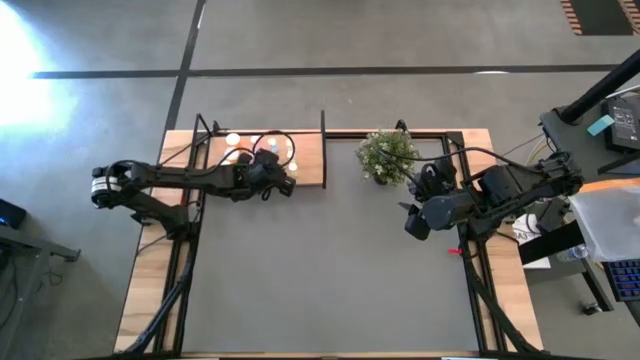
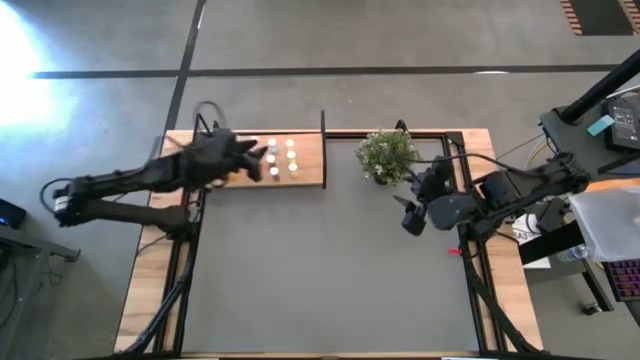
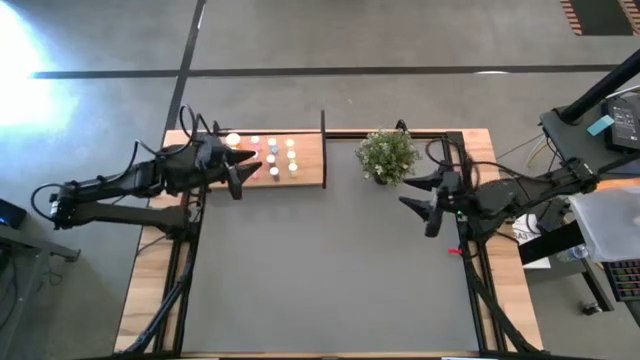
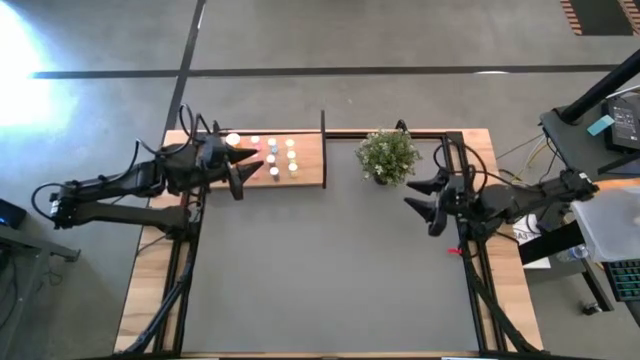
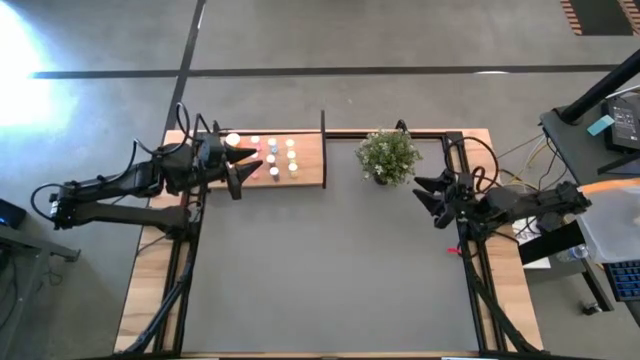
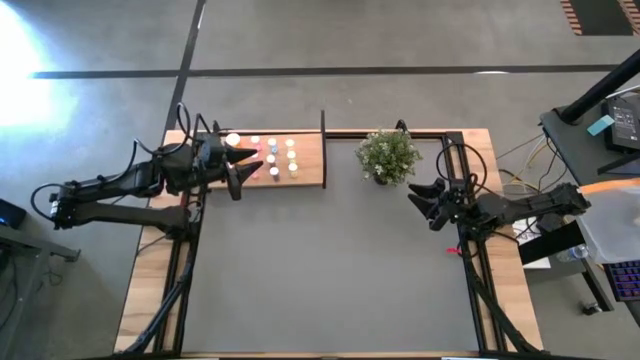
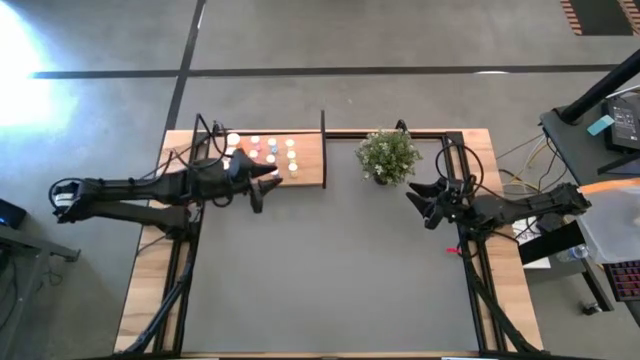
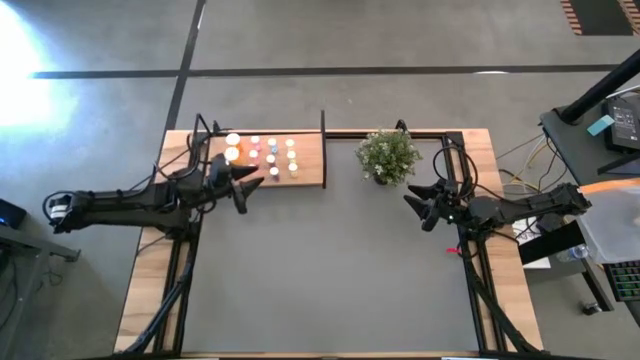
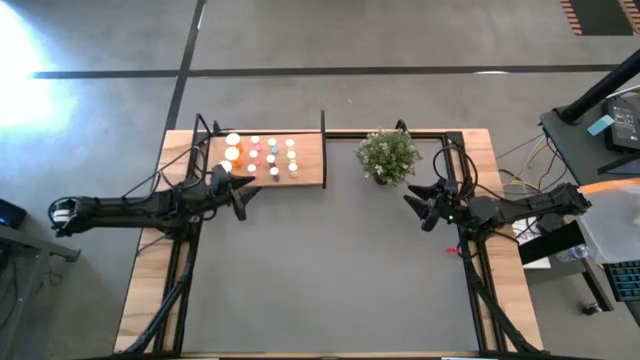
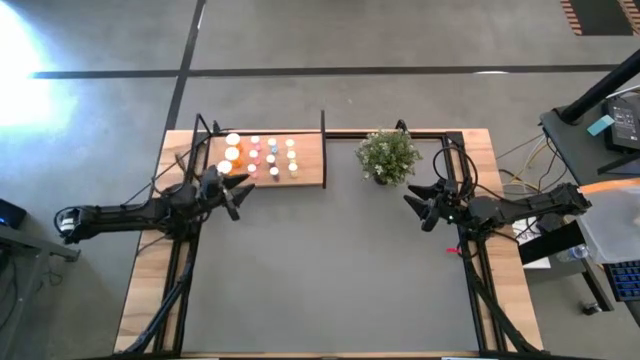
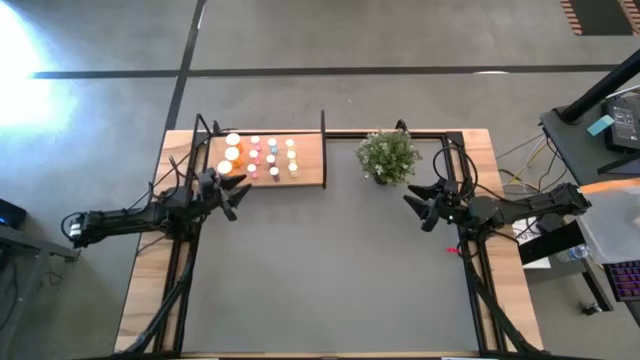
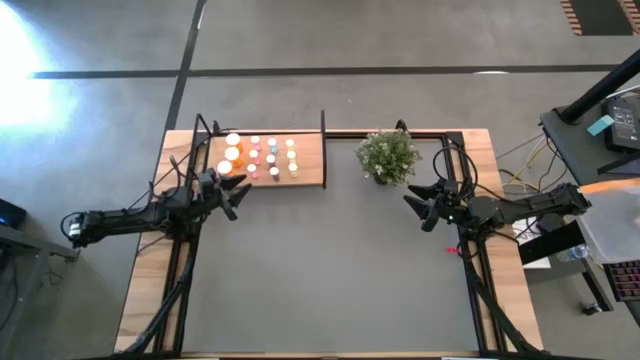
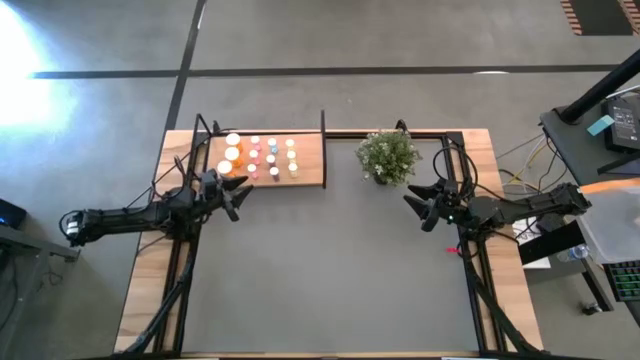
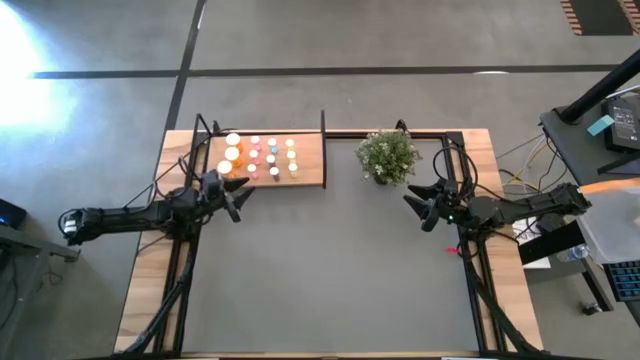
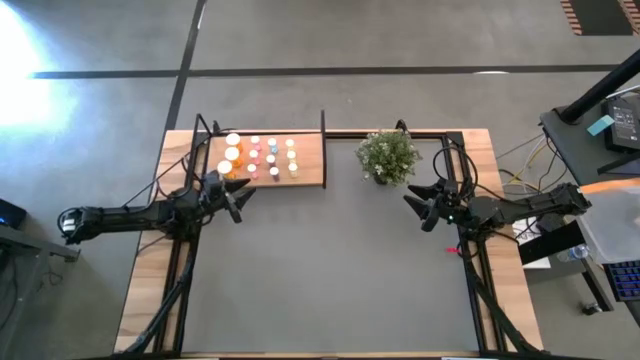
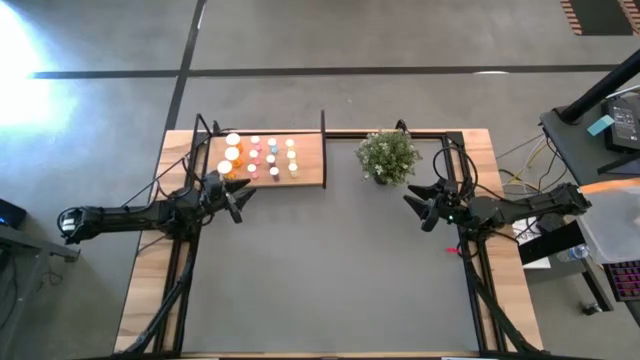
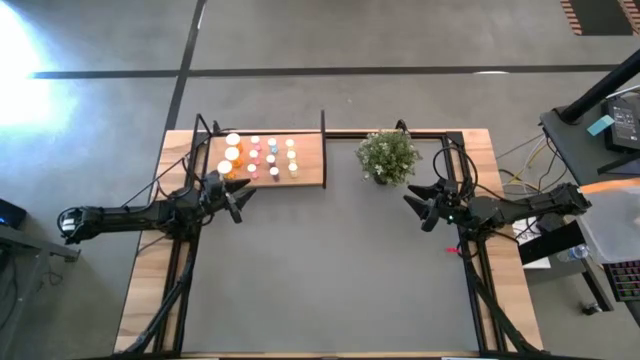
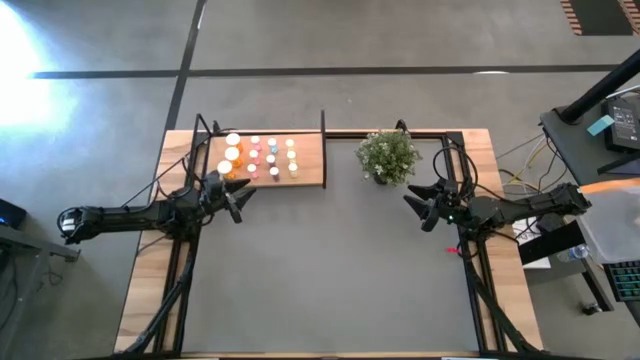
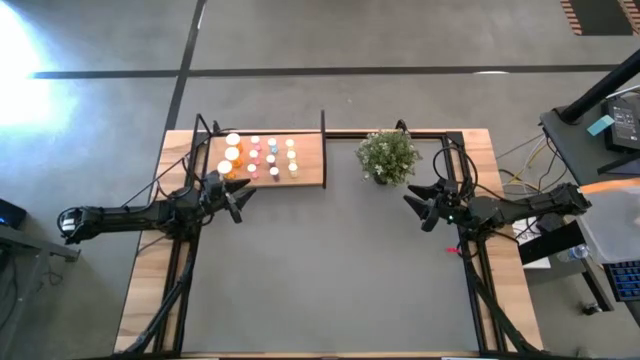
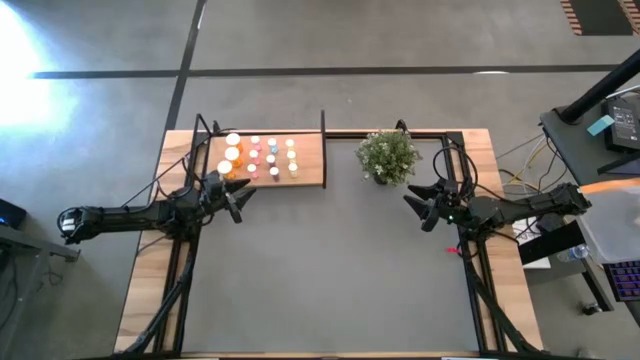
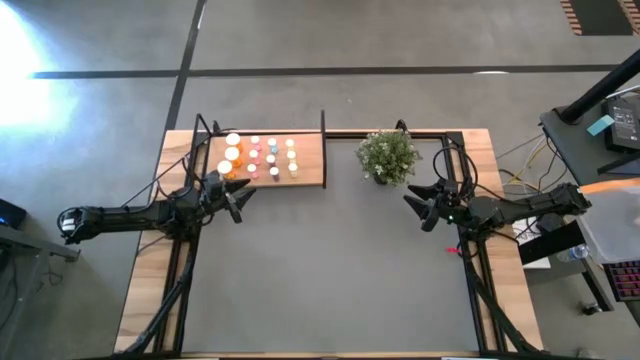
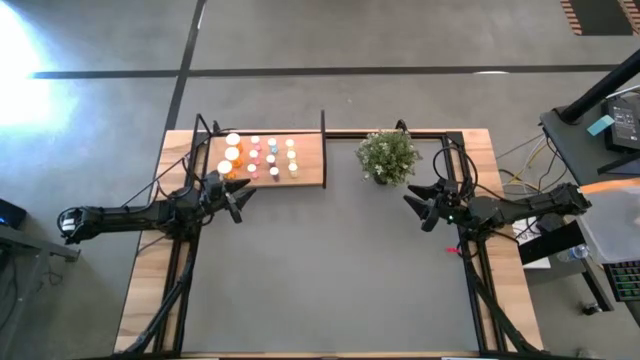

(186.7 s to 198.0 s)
Task: Pick and place medicine bottles onto shelf by color
Return to Home Position

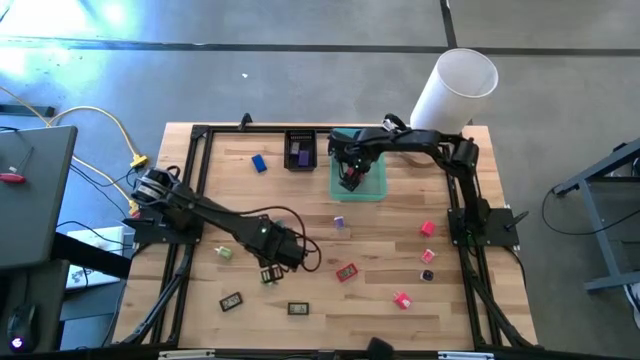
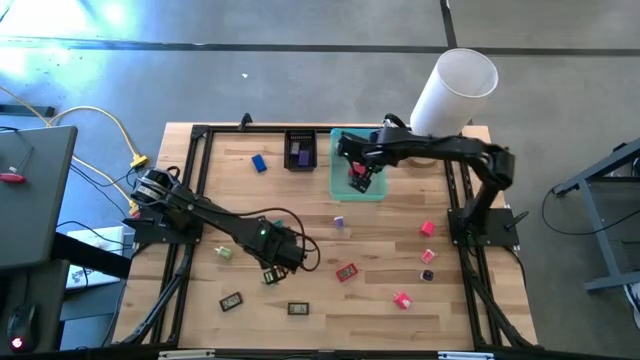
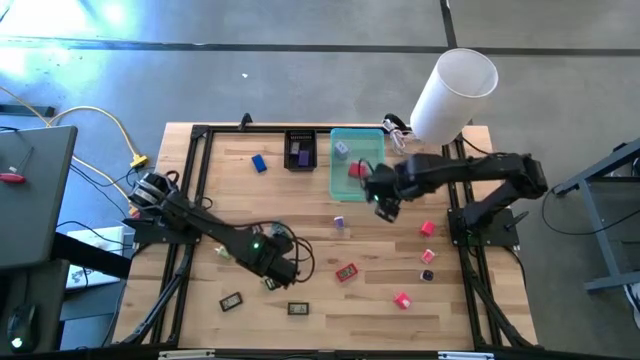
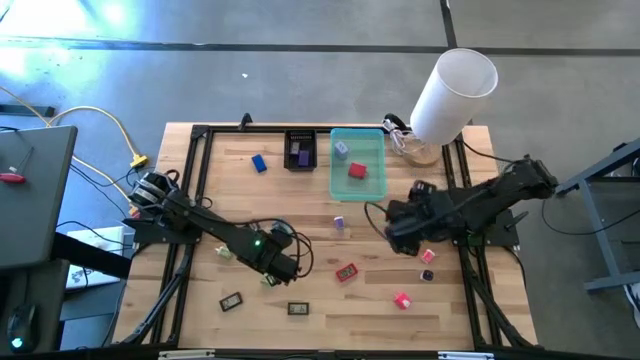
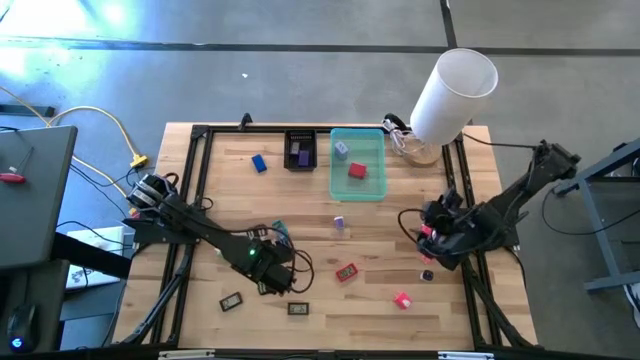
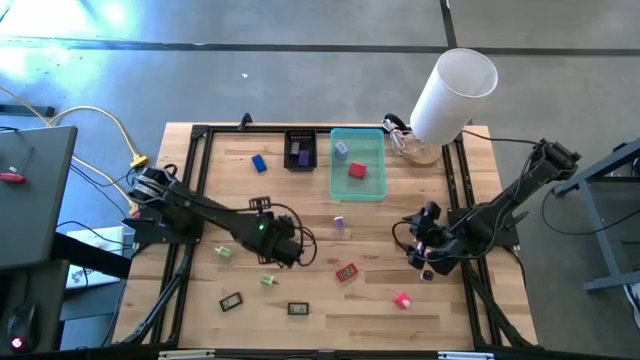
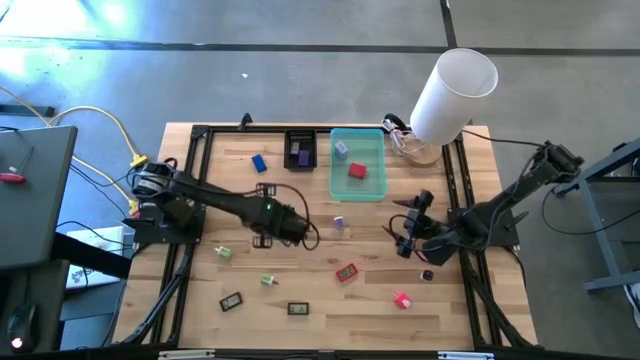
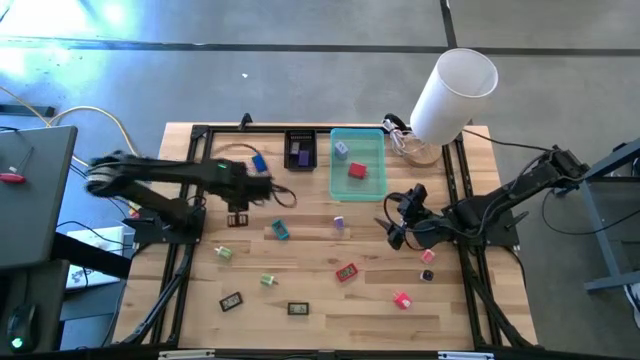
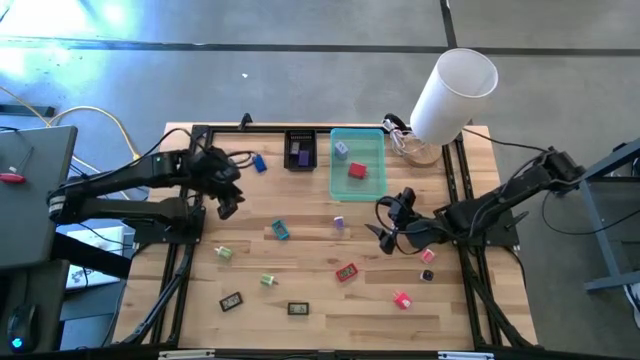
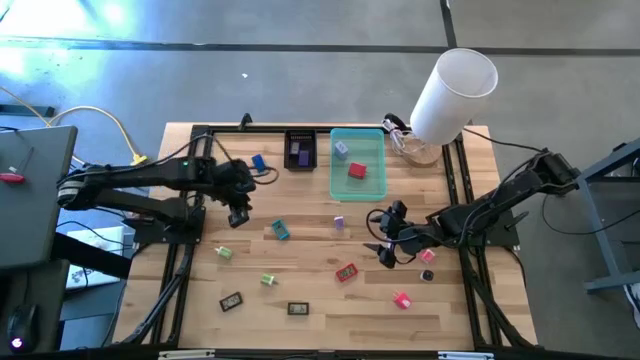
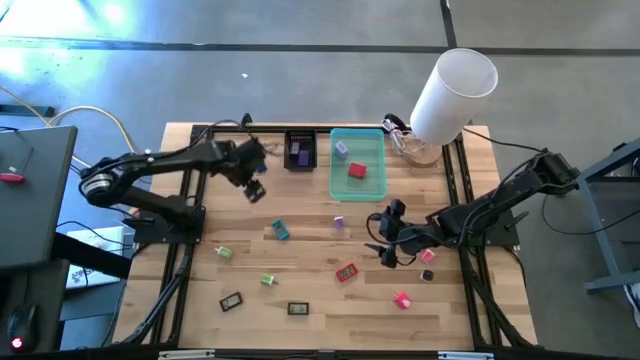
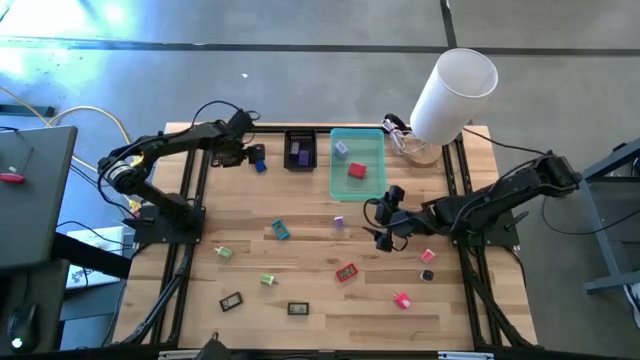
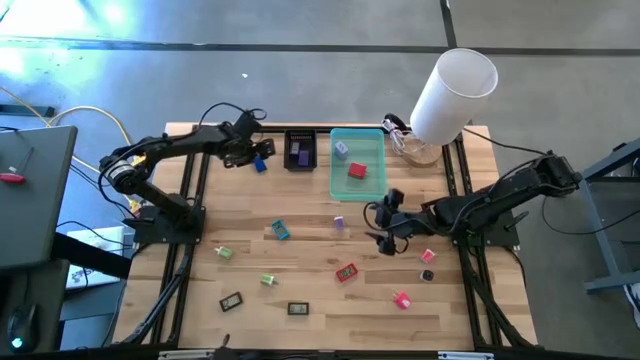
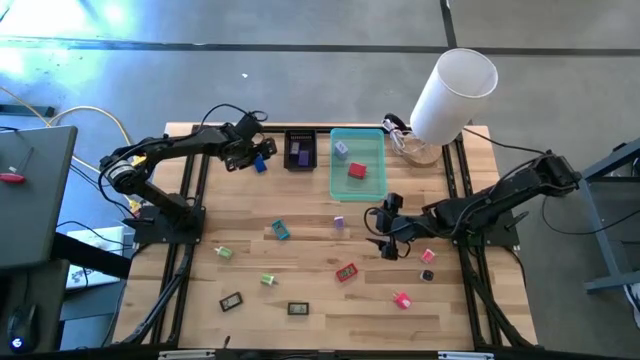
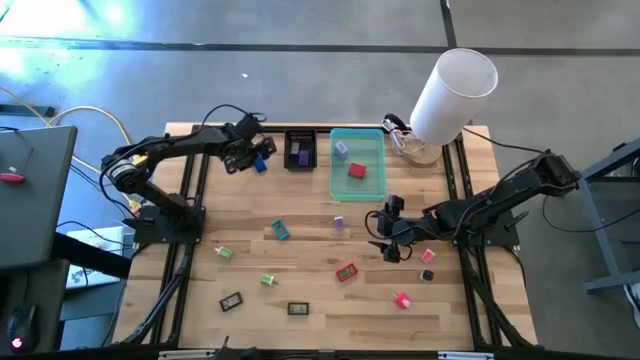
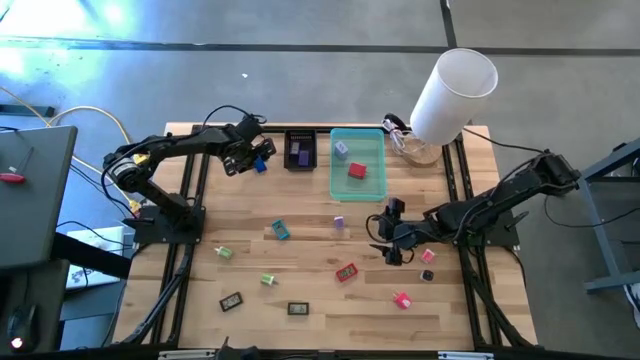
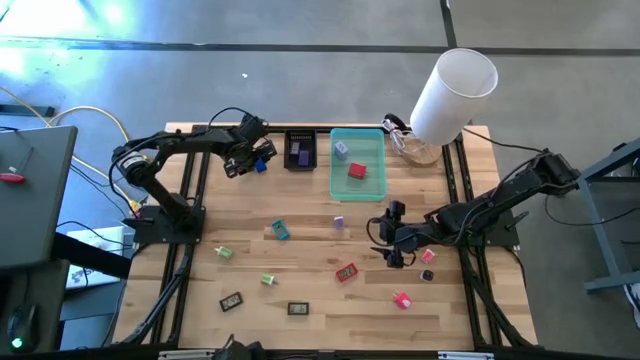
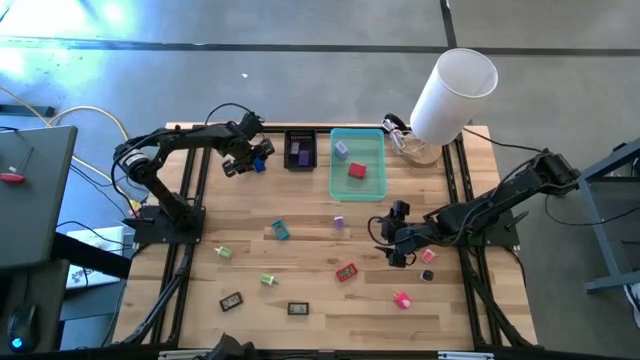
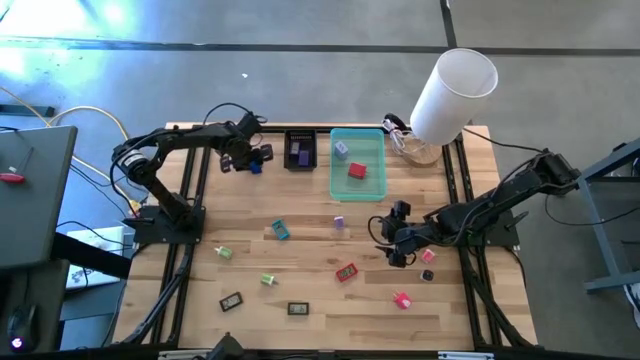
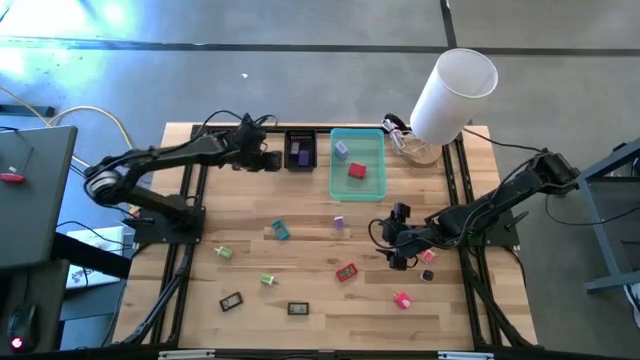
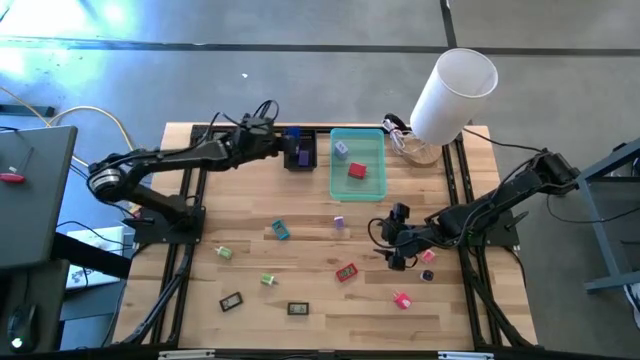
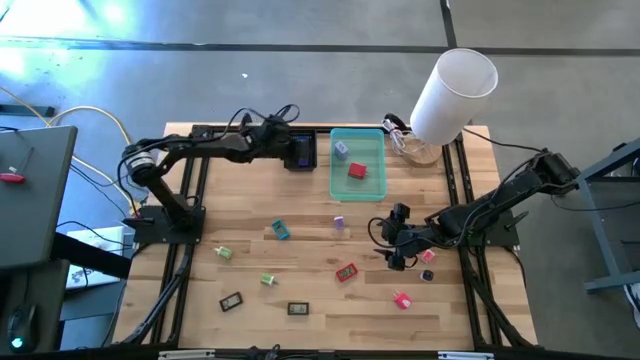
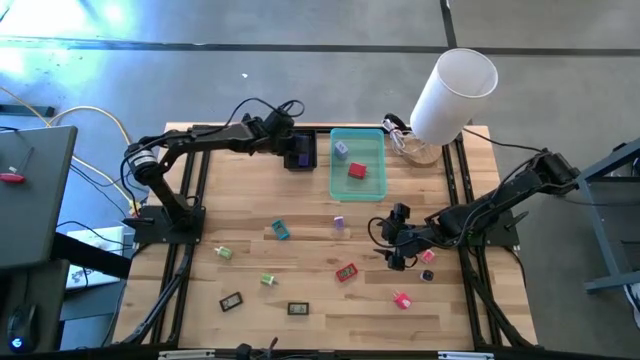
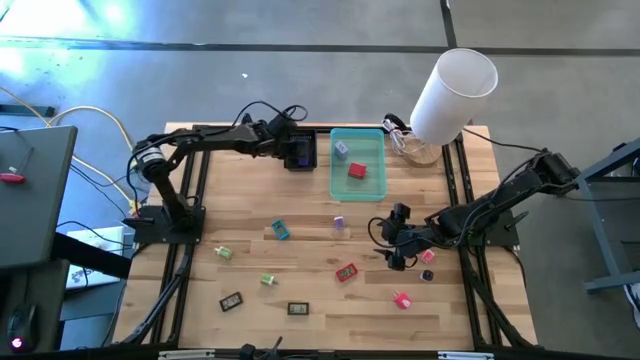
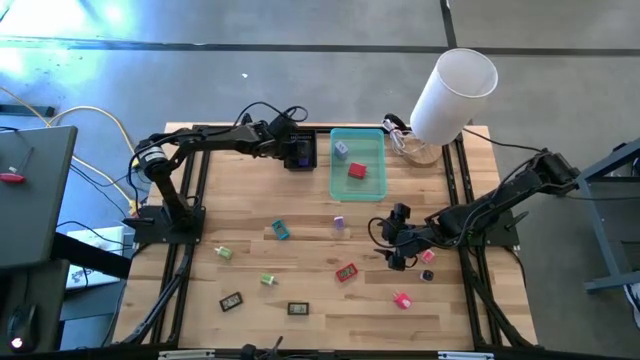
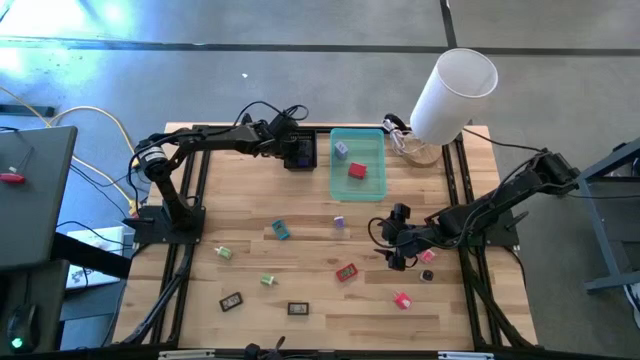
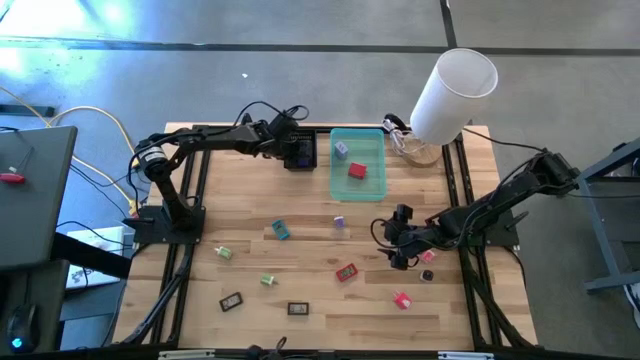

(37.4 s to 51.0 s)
Task: Pick & Place Office items
Put the dark blue digital timer into the black bin
